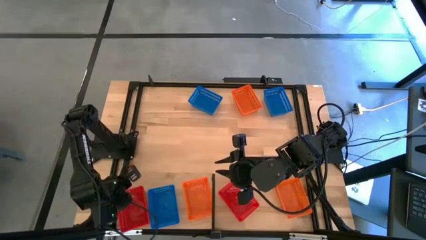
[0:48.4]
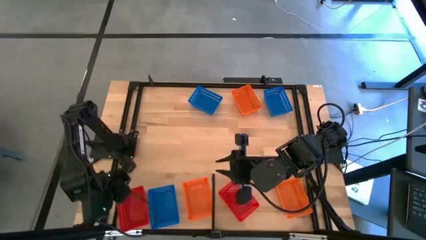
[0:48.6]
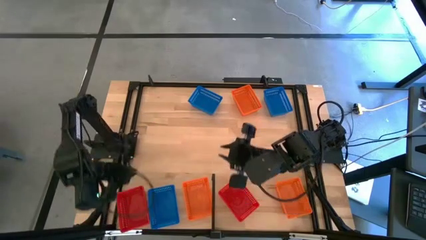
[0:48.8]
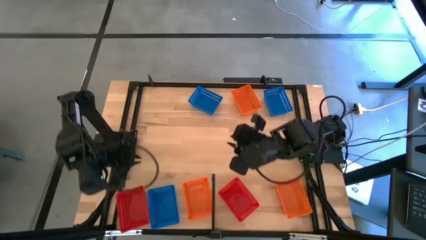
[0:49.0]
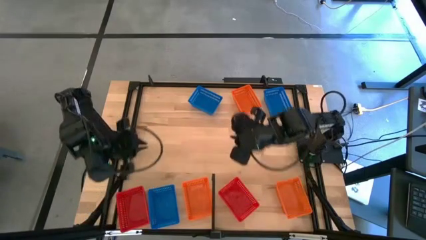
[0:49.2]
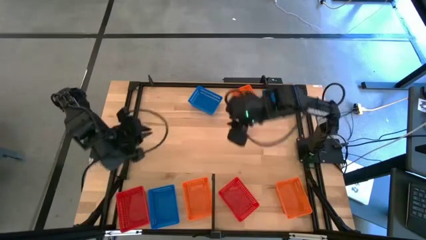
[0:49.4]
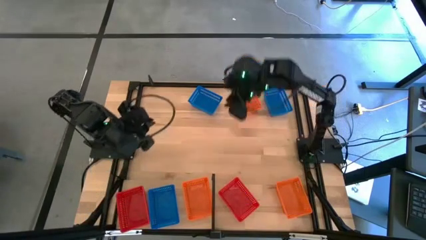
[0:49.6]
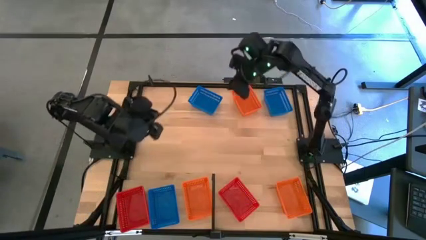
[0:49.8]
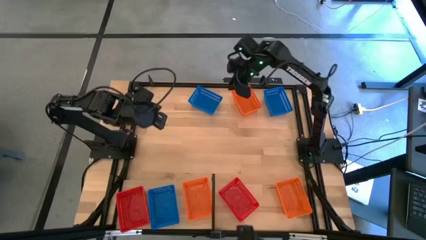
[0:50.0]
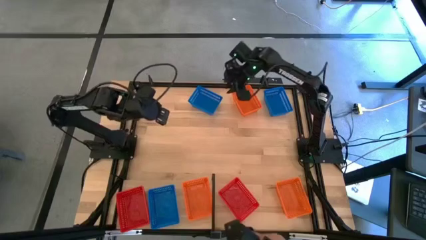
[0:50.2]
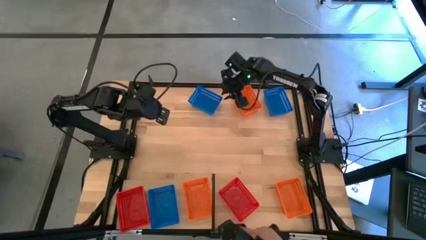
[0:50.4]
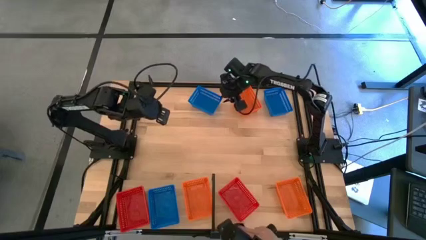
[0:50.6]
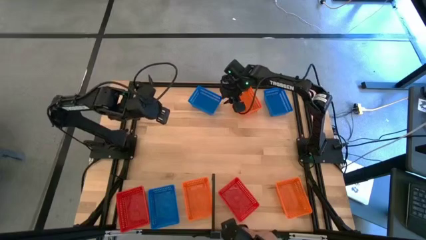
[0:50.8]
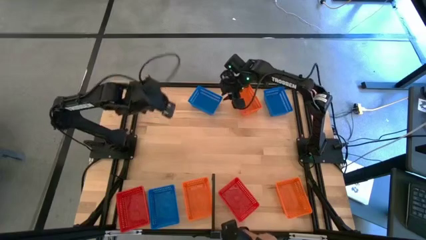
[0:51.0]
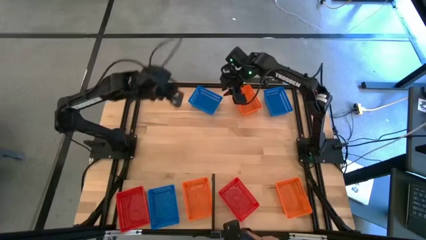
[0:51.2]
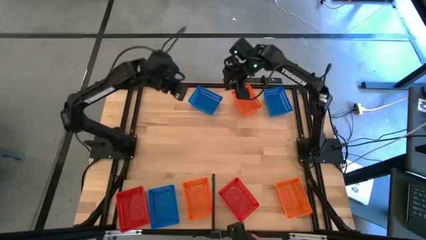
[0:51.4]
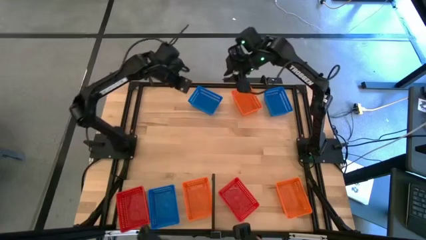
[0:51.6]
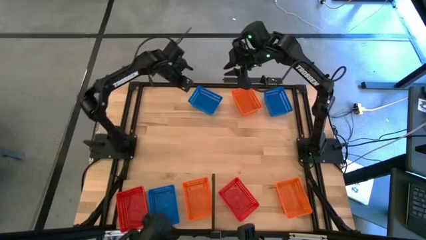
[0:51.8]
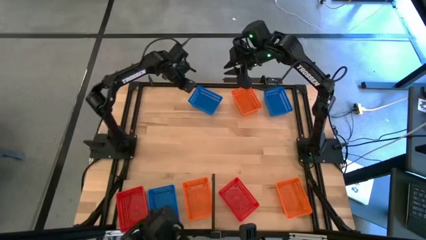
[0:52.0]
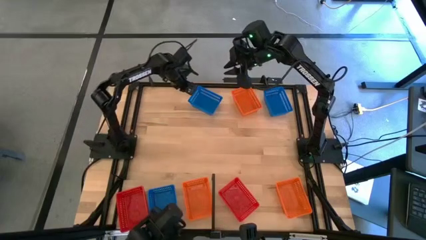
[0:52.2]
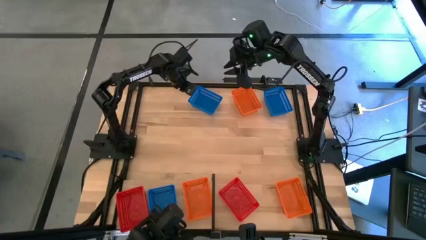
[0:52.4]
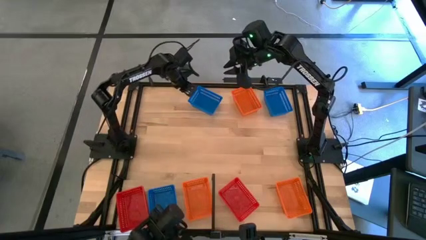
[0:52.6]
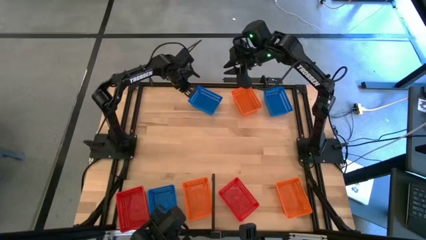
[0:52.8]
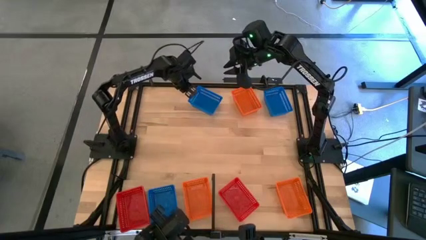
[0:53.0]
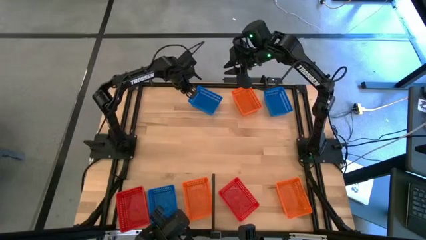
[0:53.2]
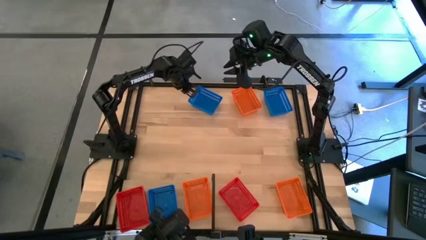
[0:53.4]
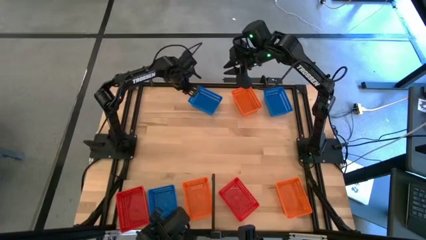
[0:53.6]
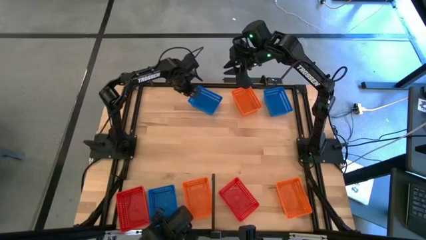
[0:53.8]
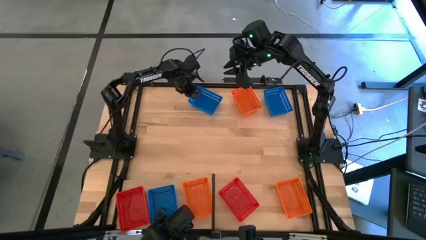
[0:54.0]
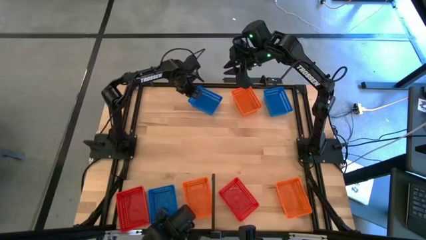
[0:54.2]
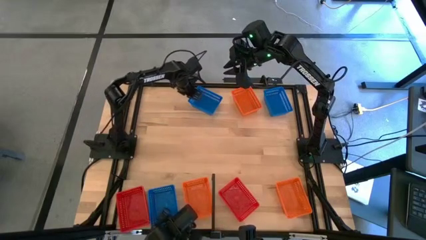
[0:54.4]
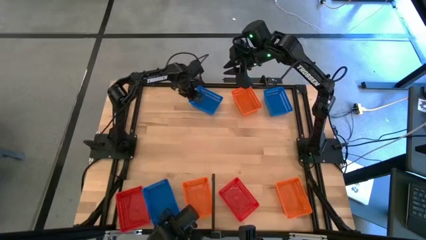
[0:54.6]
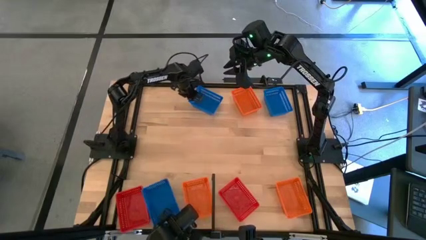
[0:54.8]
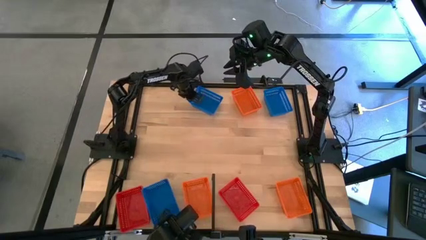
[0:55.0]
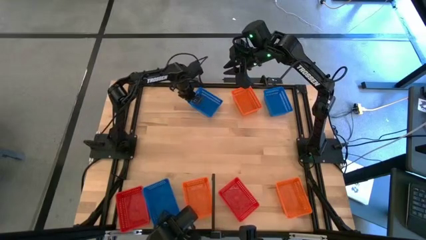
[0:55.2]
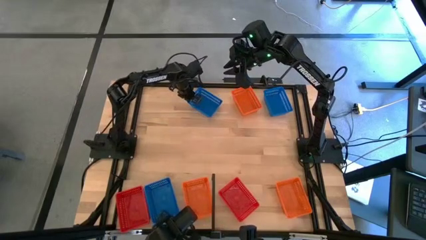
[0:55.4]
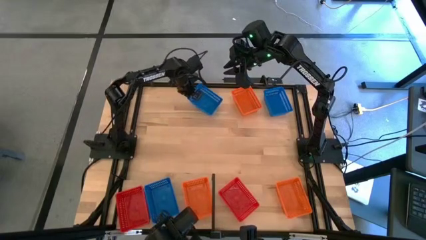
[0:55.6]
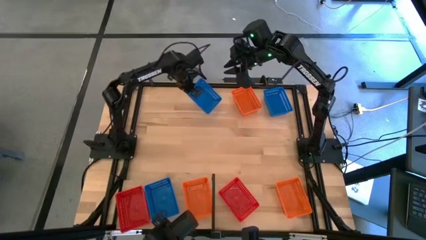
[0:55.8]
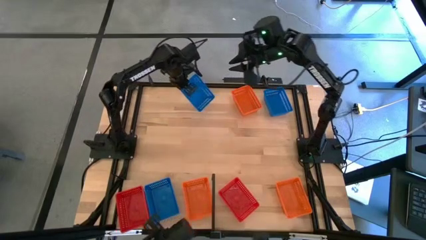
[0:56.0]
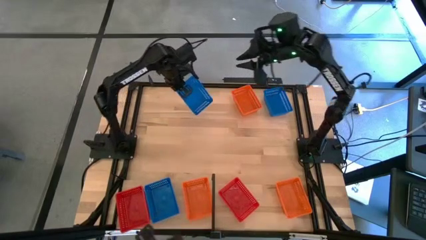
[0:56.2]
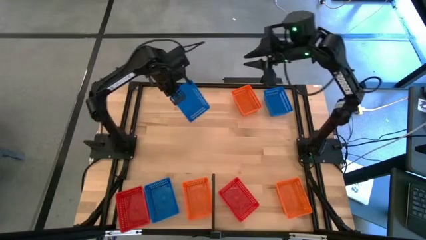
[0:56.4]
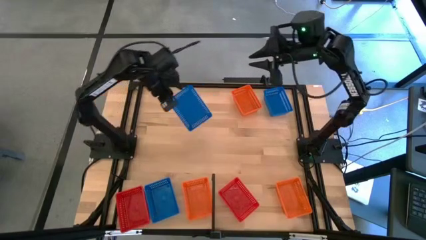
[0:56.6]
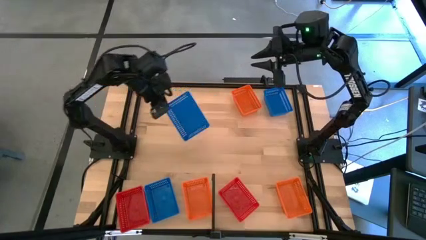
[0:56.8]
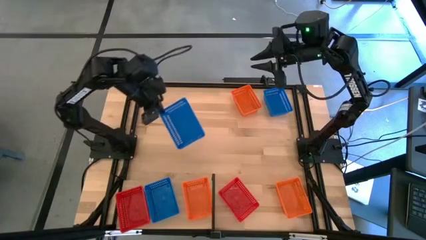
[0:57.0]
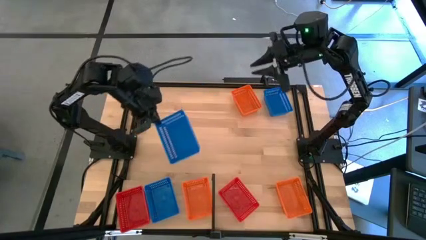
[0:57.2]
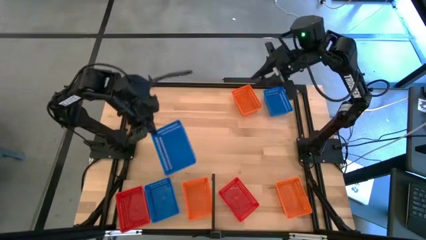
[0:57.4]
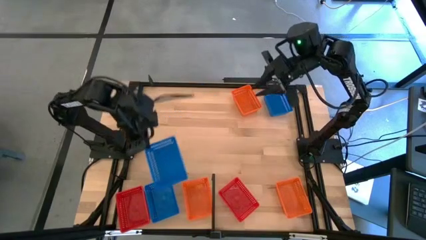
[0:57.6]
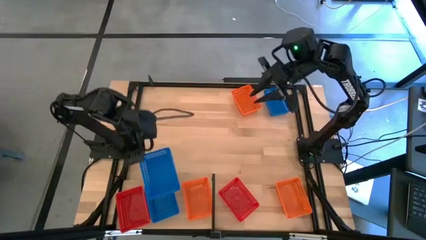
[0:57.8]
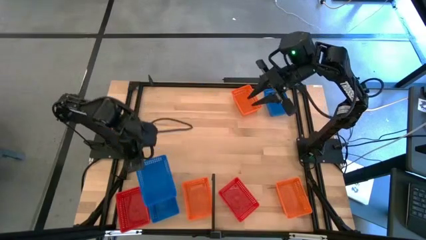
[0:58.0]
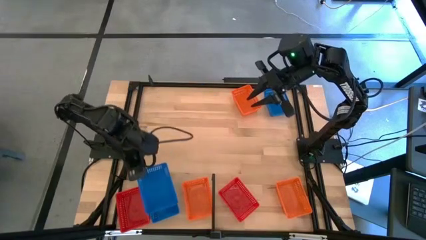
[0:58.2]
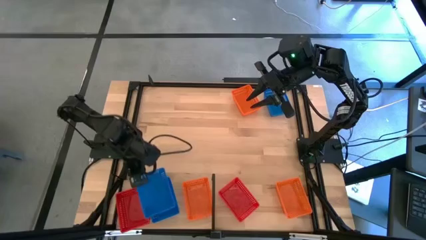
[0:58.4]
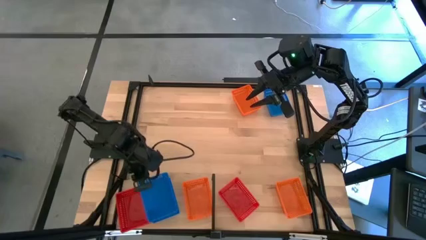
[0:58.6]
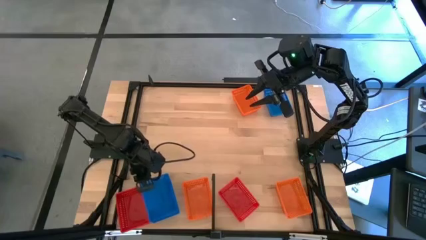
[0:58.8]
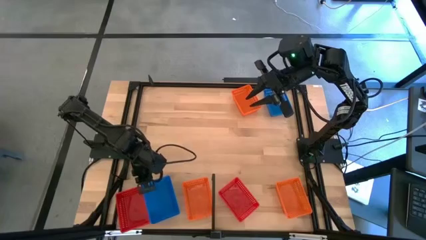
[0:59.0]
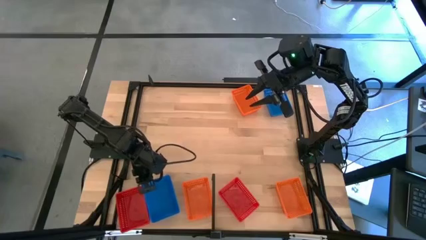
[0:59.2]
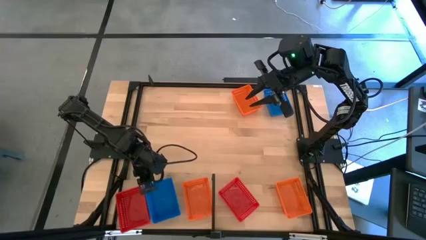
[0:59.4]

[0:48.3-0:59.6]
Task: Stack baskets on shelf by color
Stack the left blue bin on top of the blue bin on the shelf

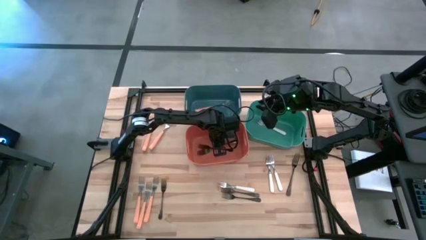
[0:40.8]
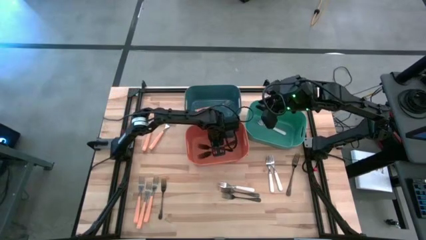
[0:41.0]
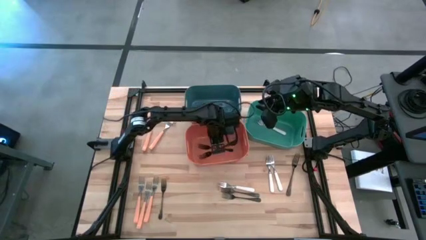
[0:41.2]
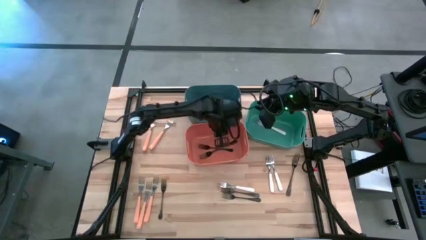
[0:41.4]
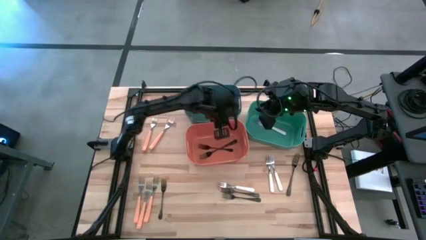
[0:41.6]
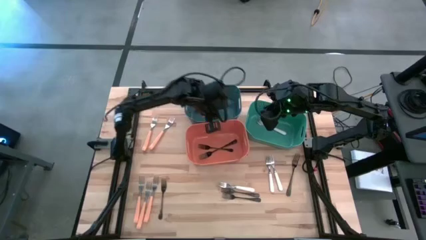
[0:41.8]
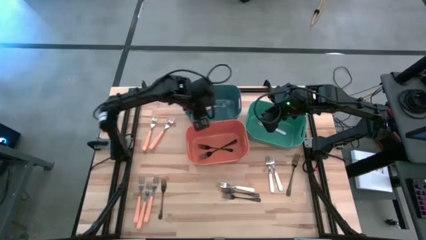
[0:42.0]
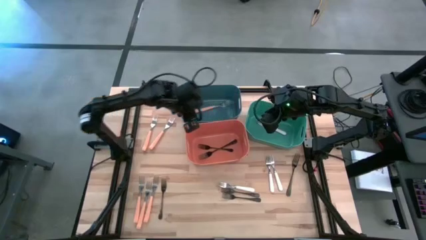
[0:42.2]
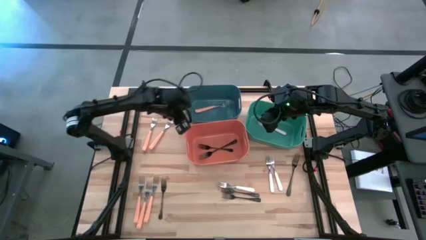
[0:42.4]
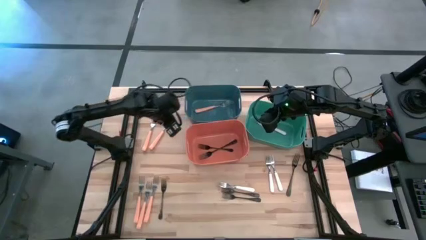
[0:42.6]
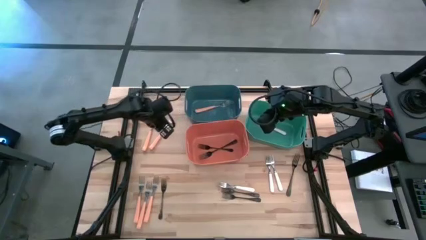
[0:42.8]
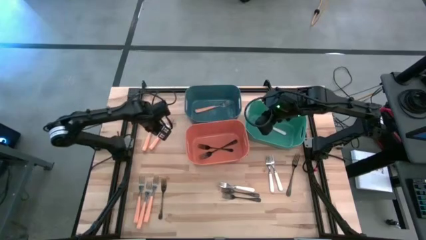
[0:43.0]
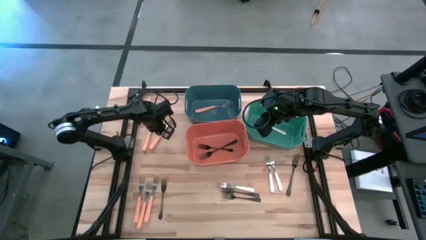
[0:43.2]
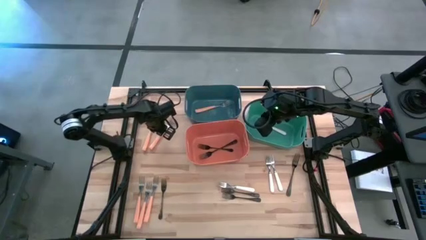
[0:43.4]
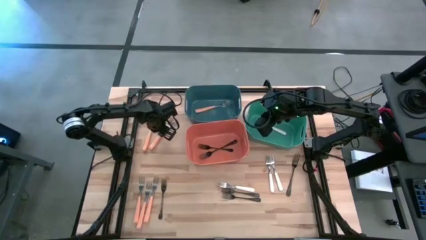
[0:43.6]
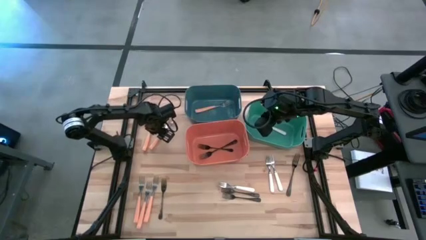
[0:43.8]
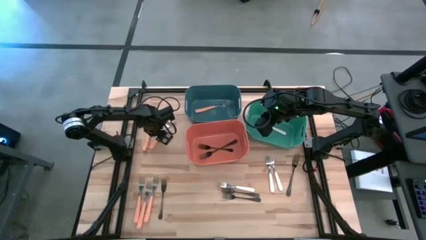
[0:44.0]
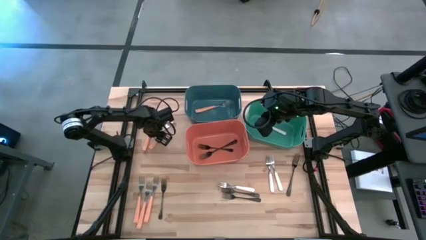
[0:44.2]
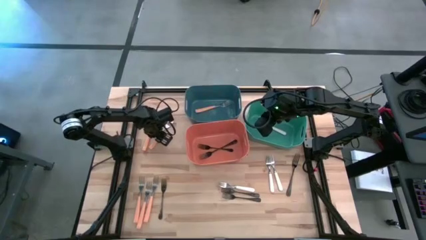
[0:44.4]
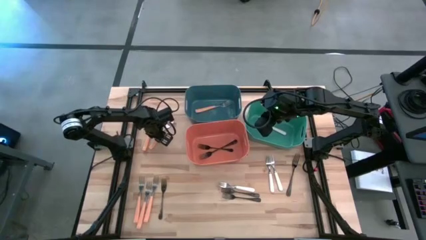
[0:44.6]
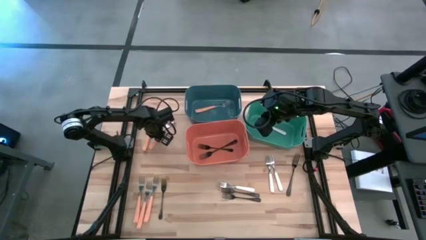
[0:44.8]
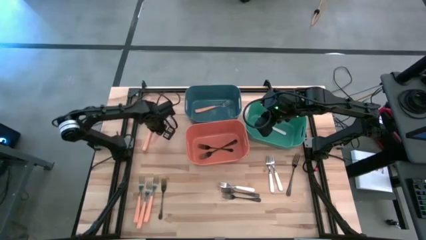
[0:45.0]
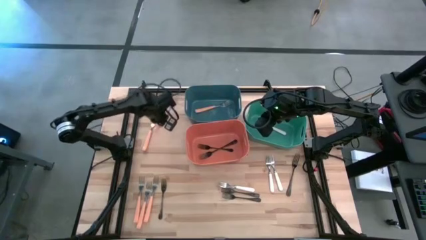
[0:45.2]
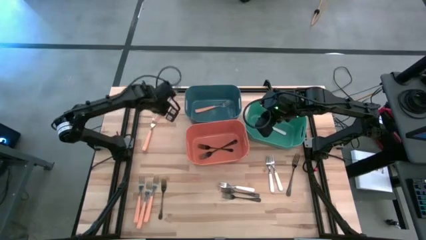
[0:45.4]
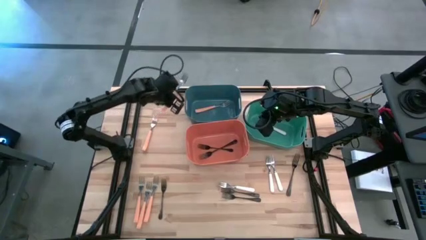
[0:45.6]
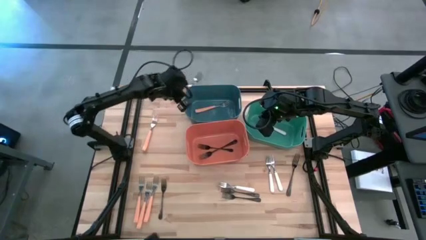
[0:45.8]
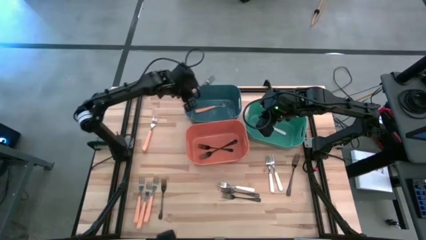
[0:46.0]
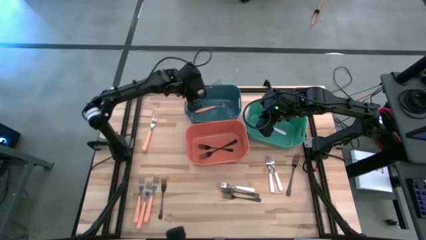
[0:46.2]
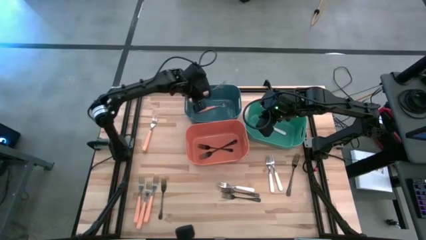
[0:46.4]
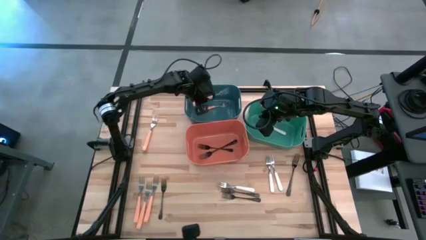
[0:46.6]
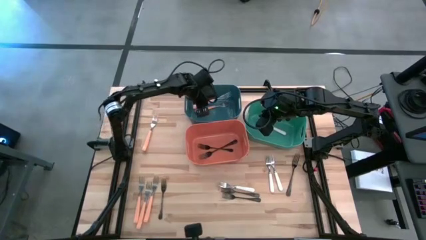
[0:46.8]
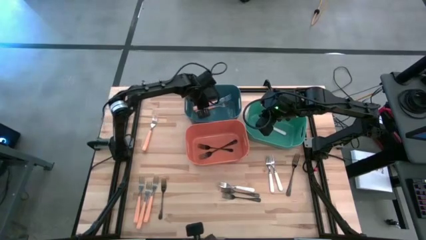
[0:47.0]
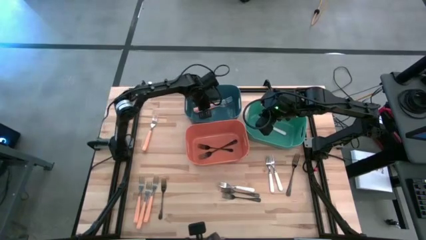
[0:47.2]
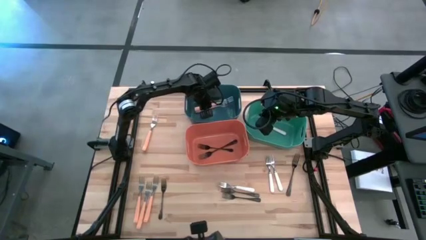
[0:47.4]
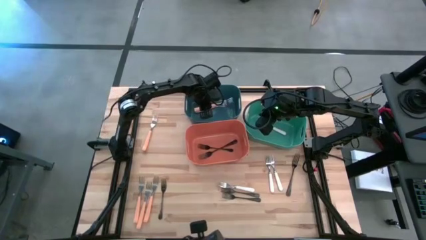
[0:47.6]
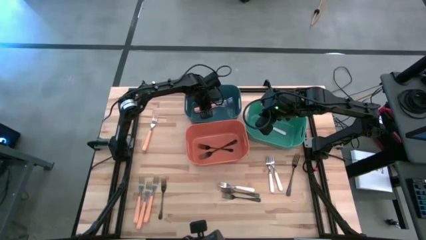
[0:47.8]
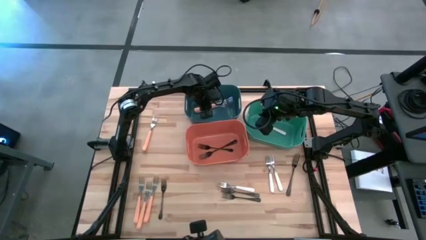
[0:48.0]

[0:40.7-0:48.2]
Task: Sort silverware by color (type)
Put the orange fork into the blue bin
